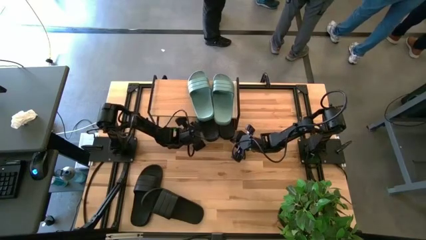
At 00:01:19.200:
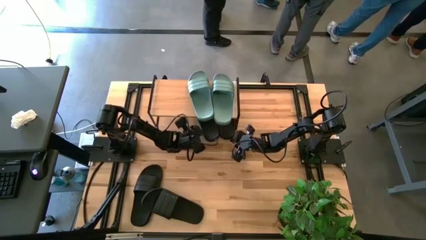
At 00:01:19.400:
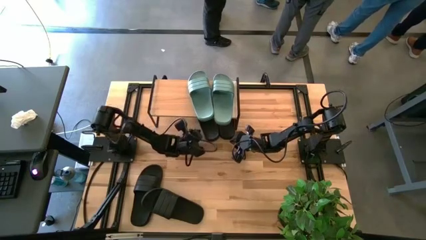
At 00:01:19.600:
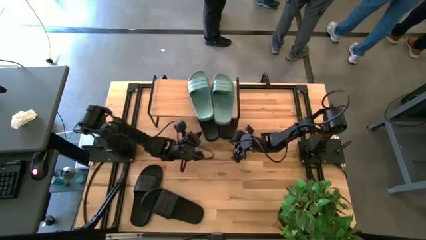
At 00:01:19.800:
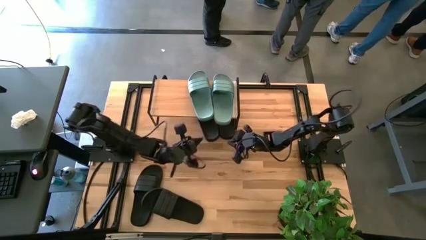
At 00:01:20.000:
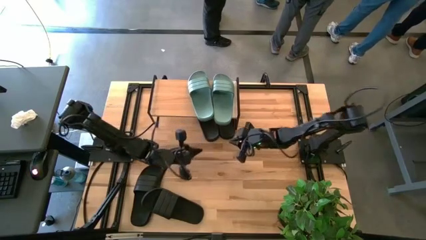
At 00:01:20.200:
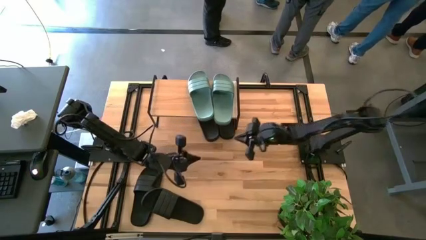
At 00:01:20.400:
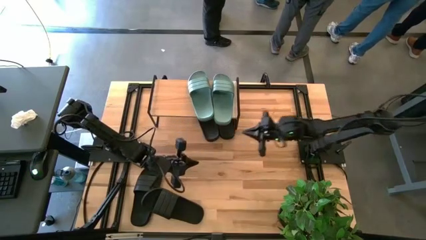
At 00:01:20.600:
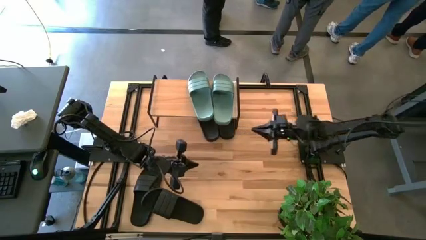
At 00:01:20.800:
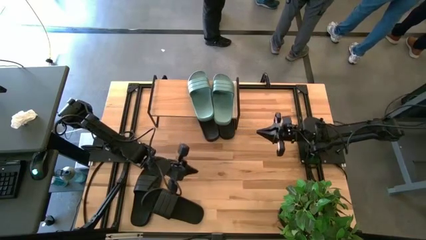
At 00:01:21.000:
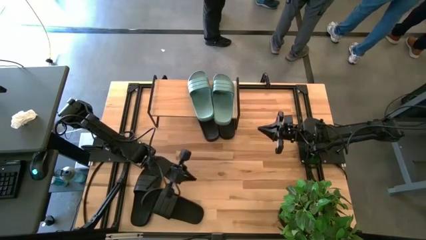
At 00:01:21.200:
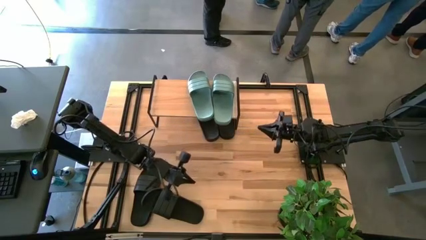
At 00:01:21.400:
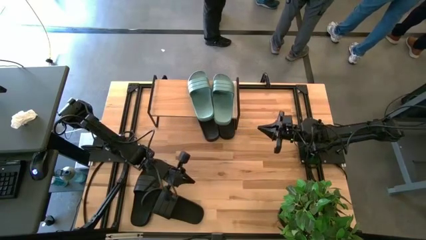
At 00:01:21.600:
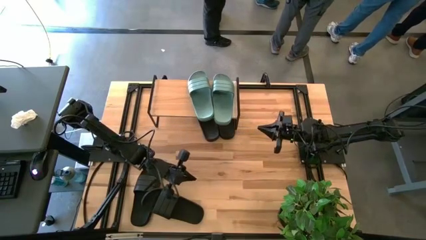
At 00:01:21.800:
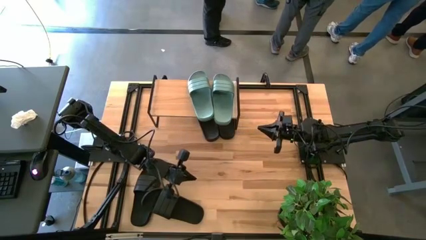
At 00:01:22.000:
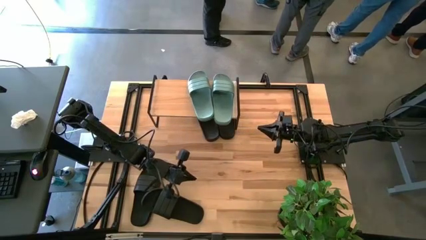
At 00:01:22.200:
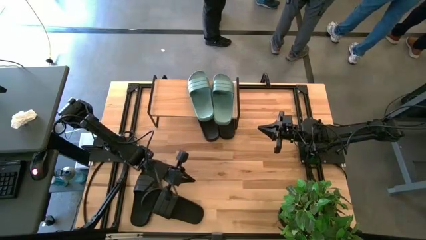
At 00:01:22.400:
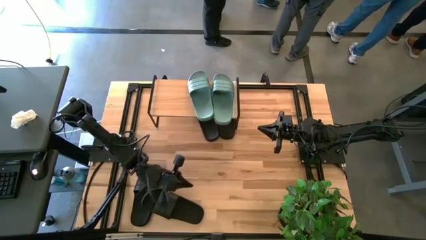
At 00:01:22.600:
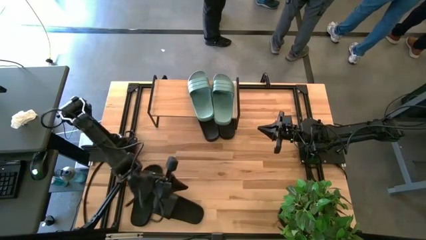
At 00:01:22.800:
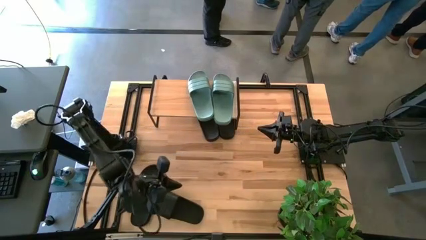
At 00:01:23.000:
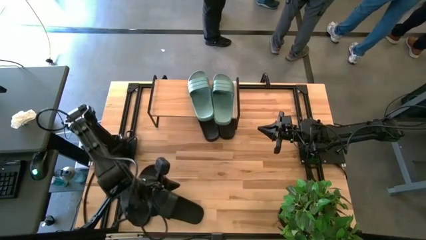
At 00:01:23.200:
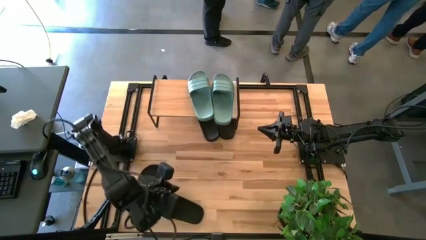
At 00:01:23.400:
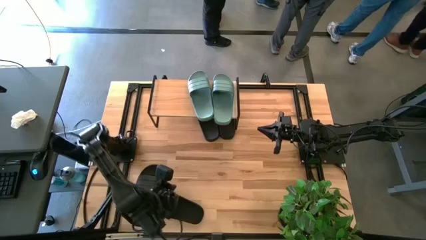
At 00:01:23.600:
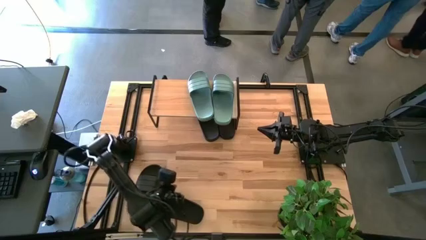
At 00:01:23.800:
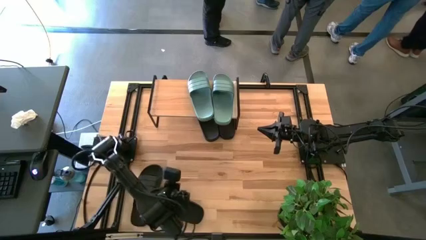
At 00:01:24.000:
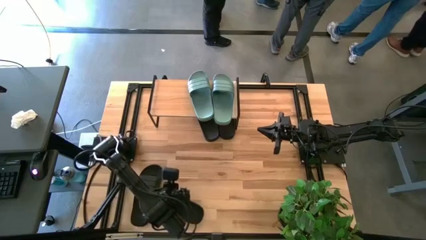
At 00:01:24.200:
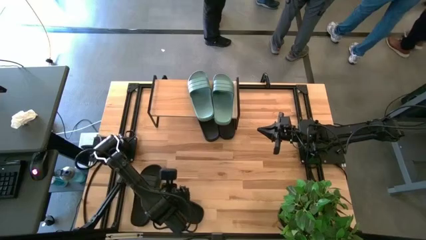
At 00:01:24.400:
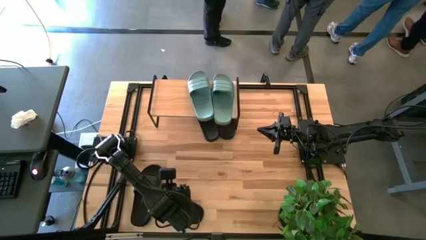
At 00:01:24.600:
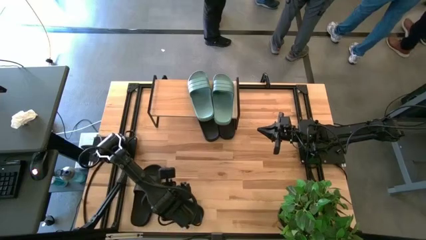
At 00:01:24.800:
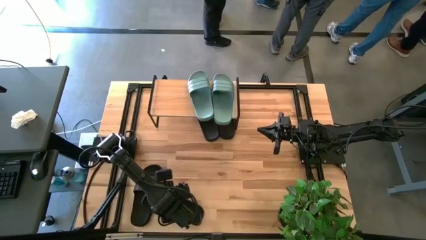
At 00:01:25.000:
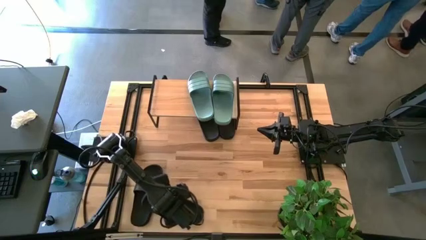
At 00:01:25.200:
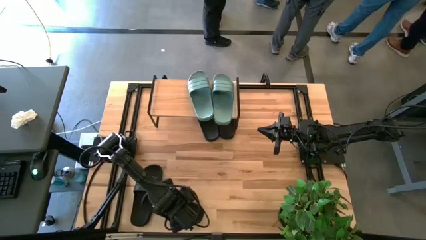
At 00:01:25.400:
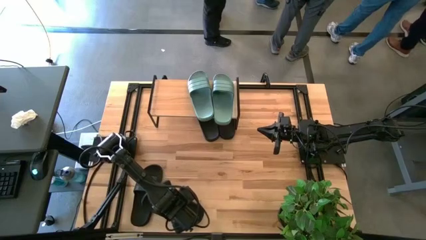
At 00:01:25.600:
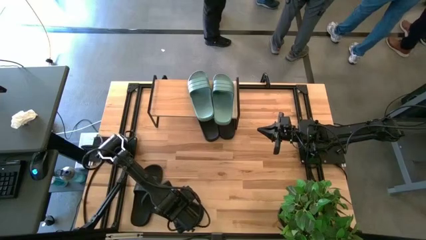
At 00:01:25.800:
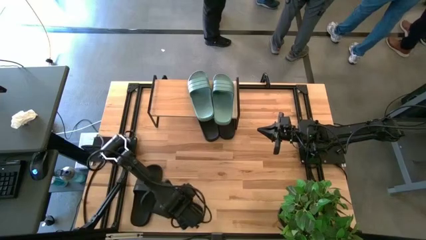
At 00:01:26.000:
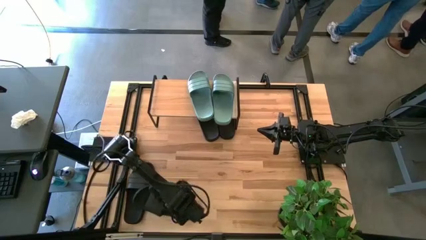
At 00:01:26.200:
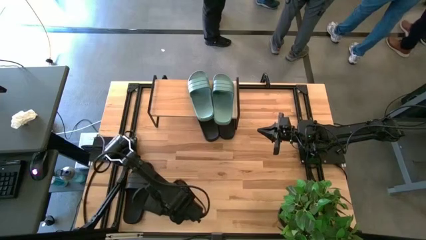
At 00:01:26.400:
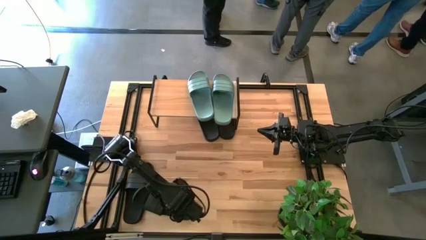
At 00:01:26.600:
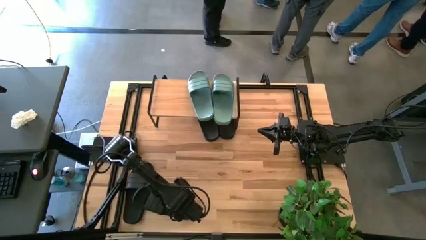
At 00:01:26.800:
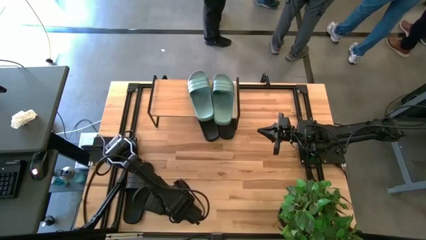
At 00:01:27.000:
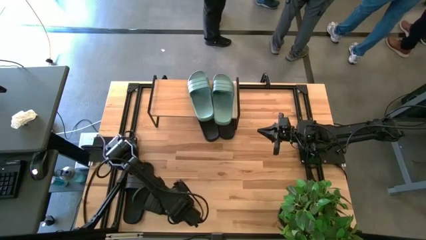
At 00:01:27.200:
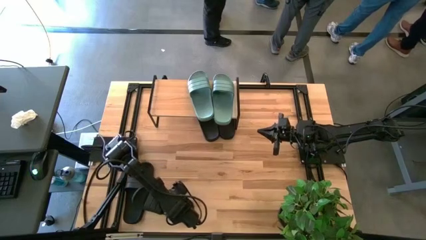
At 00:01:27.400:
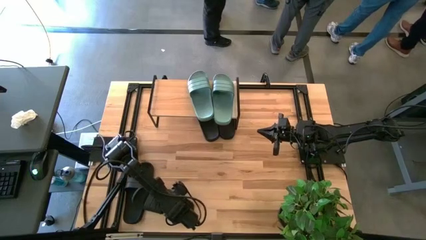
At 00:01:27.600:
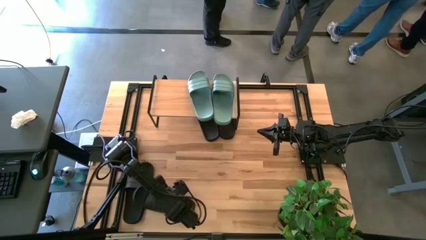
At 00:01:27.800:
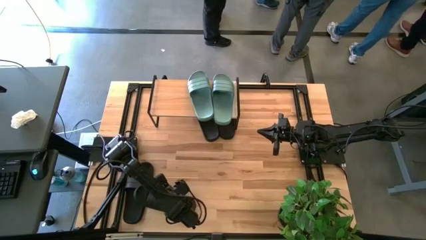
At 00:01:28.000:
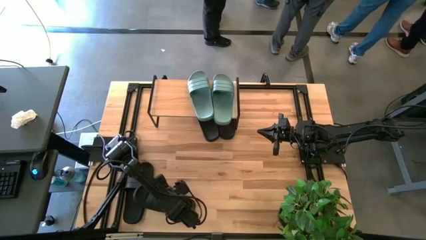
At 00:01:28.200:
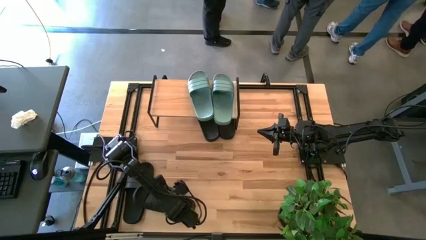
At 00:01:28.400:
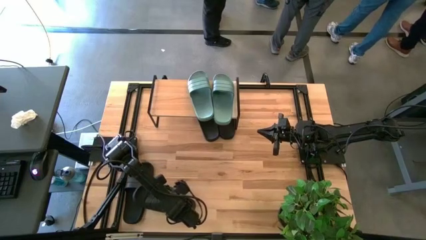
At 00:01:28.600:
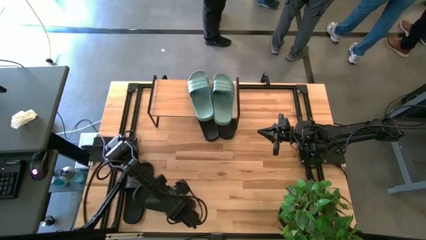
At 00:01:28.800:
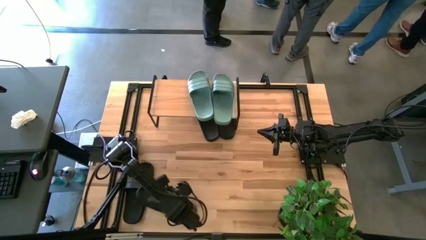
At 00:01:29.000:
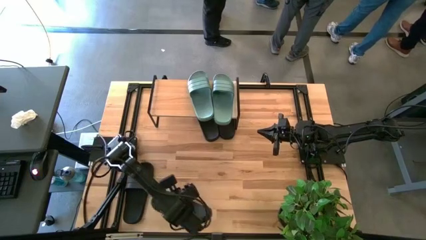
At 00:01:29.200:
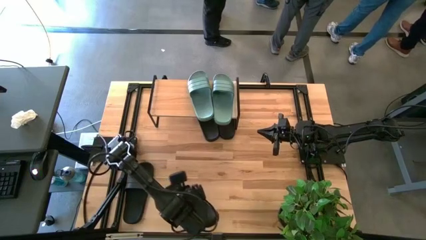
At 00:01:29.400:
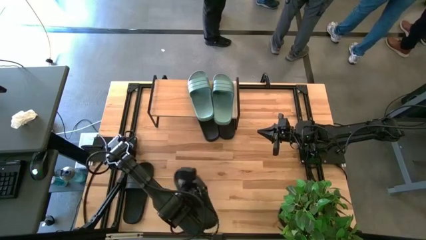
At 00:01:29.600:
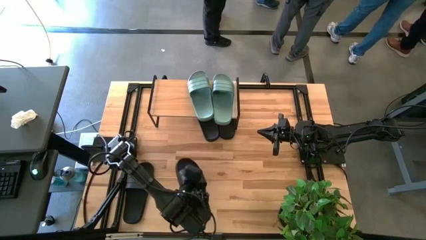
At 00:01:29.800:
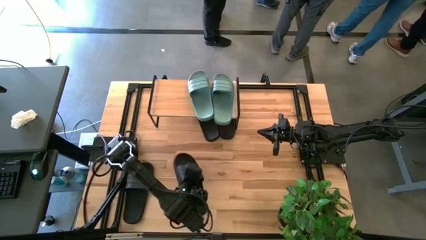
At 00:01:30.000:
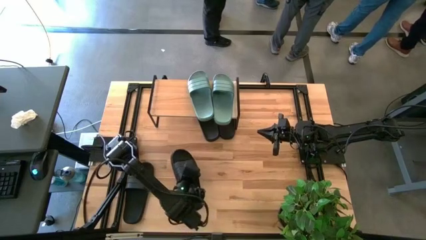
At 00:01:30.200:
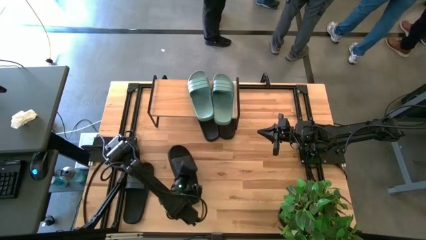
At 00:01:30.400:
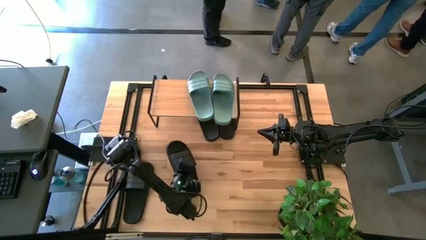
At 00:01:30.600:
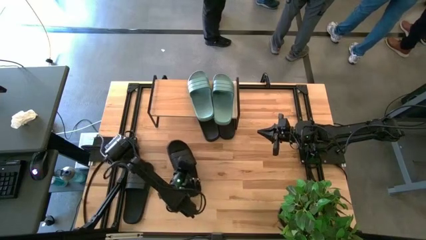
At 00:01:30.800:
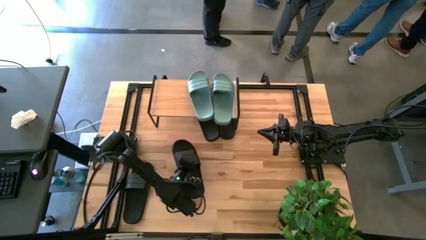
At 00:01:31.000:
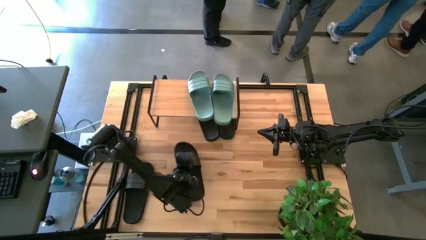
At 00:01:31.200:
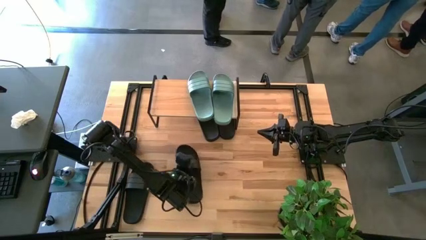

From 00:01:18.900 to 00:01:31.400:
Task: Pick and place slides into the shelf
Put the black slide under the shelf

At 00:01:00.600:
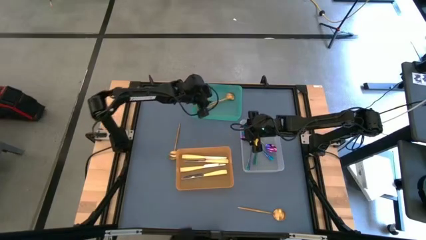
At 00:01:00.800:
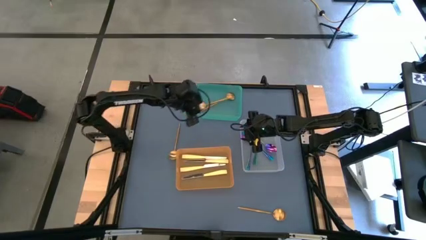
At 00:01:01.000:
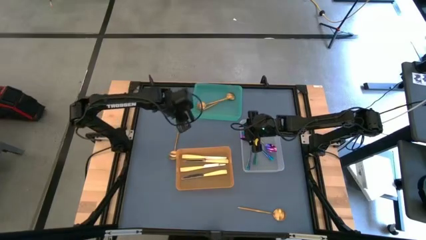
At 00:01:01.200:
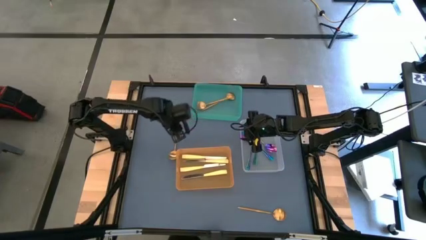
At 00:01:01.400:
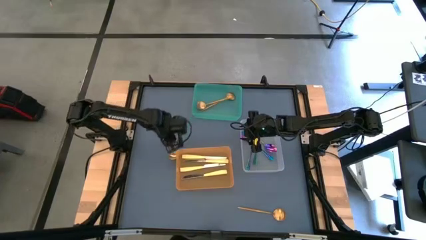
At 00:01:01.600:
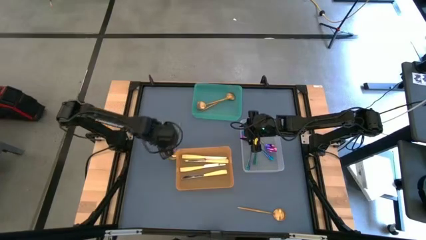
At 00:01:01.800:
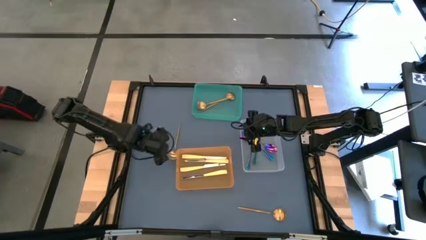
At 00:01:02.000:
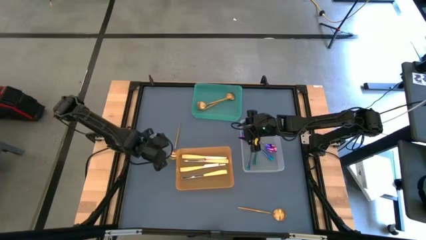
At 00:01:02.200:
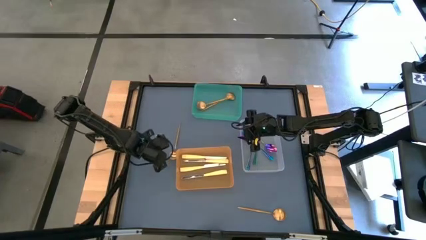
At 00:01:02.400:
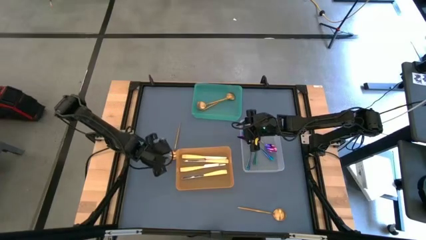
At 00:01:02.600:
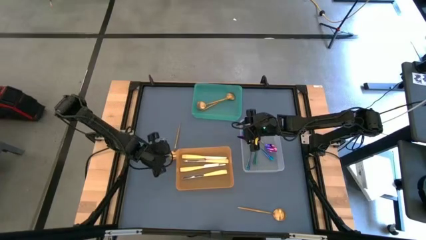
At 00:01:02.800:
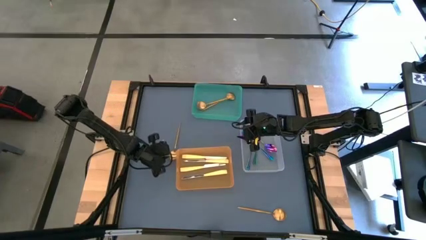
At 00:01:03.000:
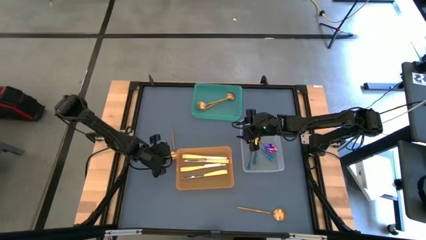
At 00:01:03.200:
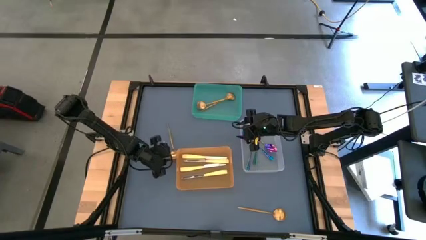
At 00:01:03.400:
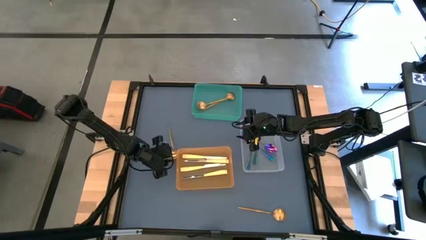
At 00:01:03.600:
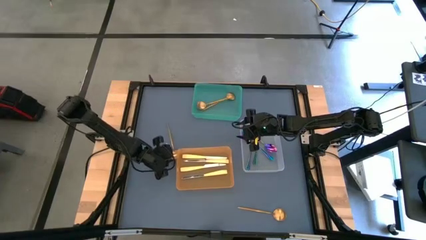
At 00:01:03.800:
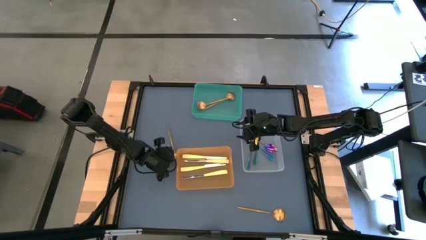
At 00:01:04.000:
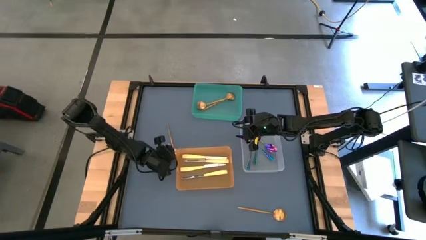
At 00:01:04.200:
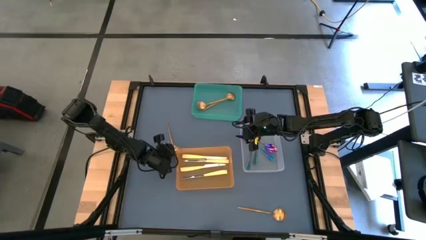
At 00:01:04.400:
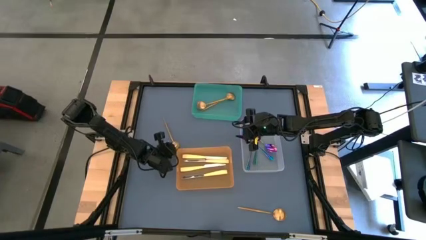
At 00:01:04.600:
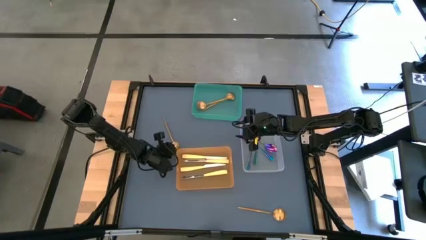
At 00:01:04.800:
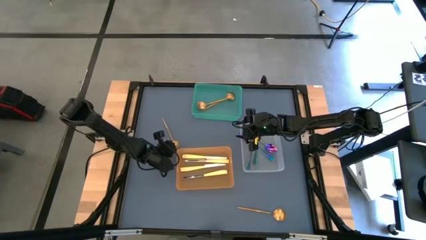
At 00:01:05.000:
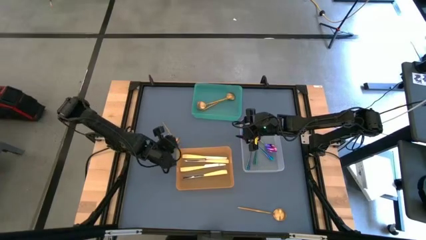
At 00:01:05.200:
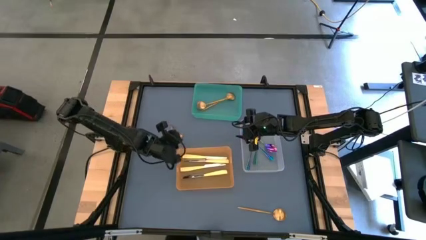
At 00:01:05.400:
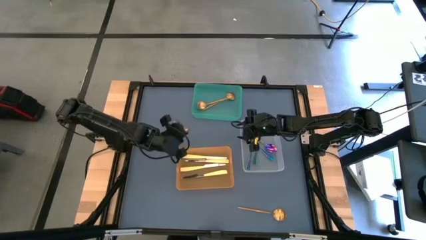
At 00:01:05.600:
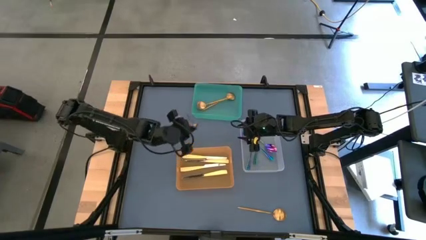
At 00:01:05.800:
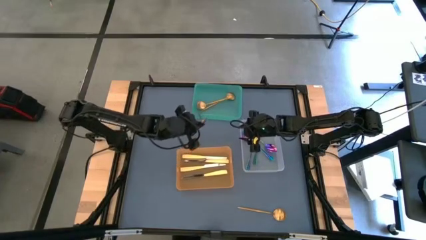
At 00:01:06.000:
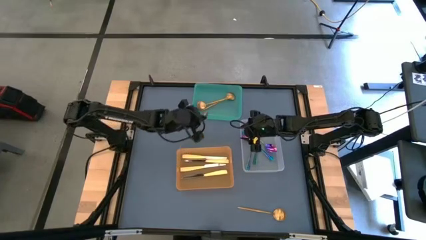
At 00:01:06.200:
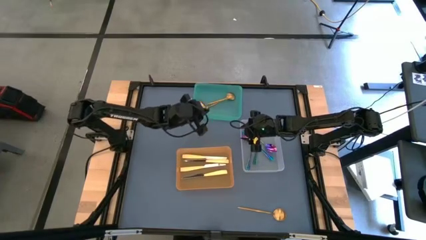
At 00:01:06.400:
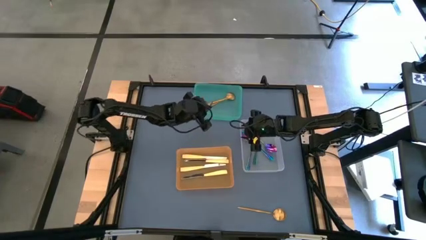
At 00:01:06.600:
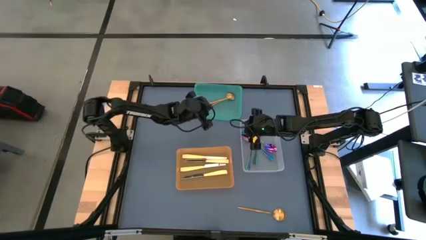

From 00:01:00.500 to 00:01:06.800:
Task: Sort silverware by color (type)
Put the gold spoon into the green bin
